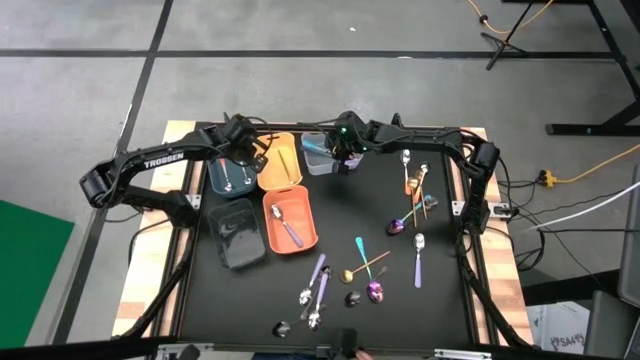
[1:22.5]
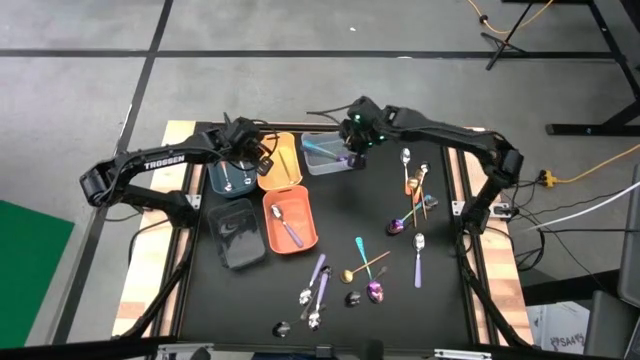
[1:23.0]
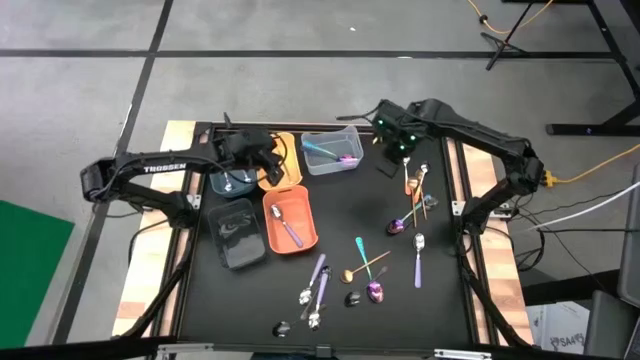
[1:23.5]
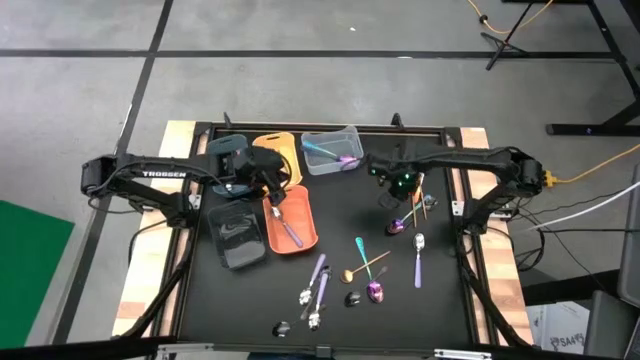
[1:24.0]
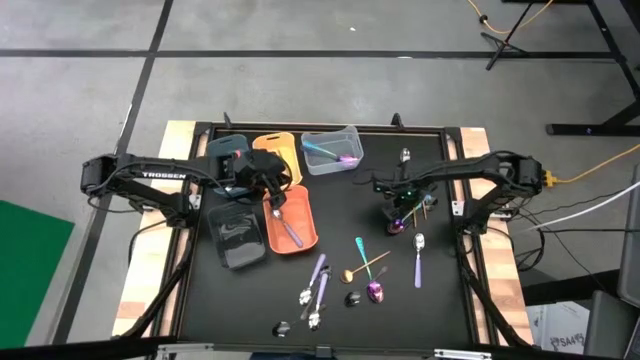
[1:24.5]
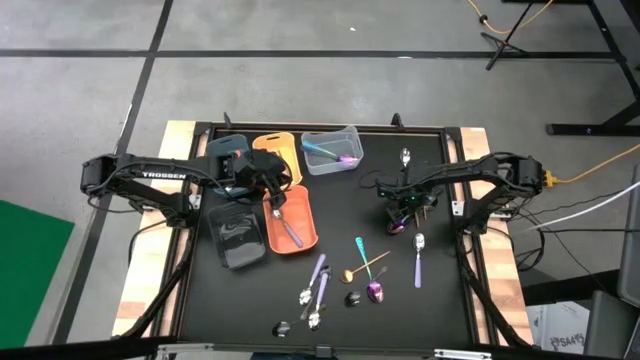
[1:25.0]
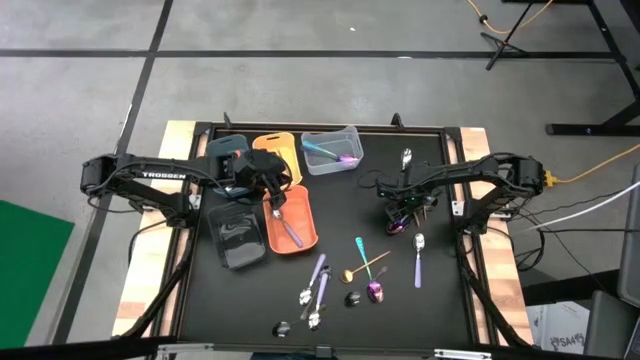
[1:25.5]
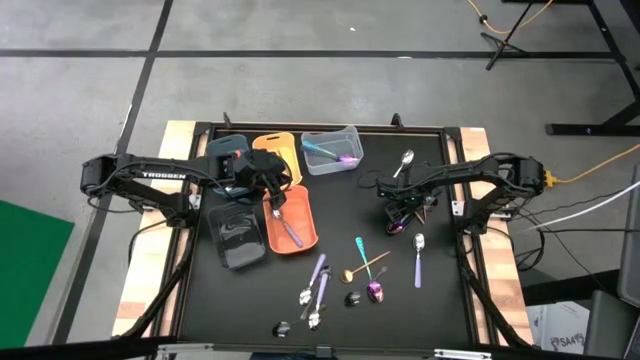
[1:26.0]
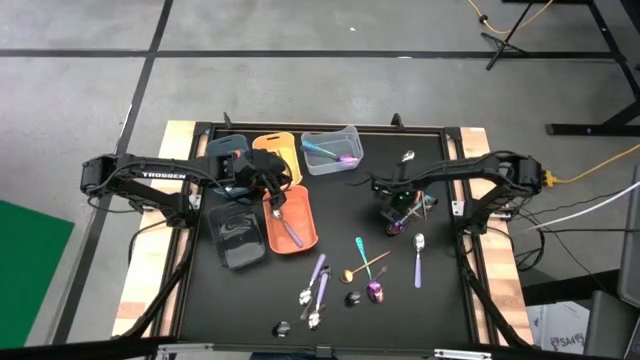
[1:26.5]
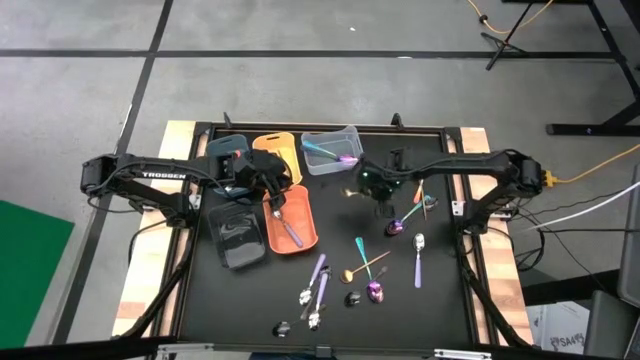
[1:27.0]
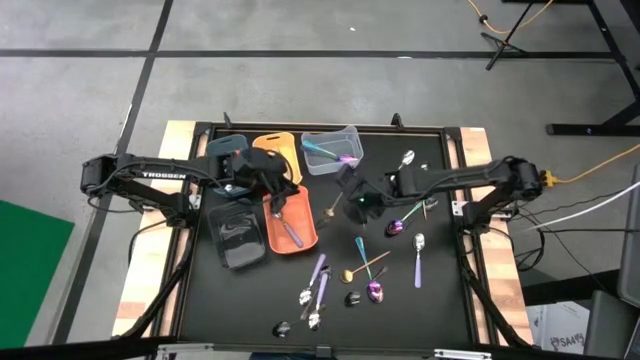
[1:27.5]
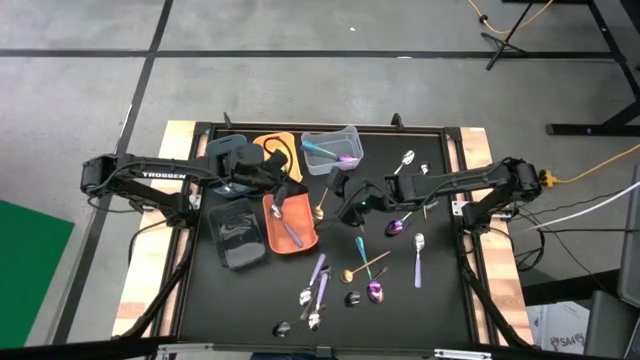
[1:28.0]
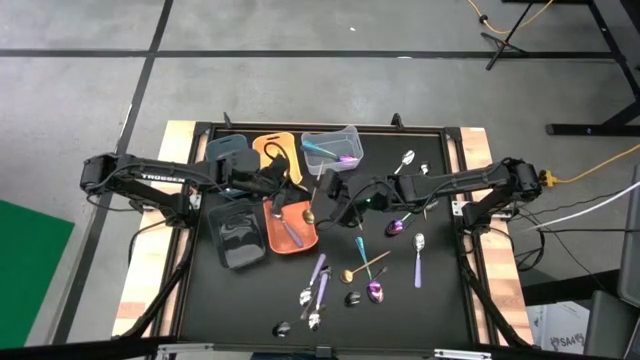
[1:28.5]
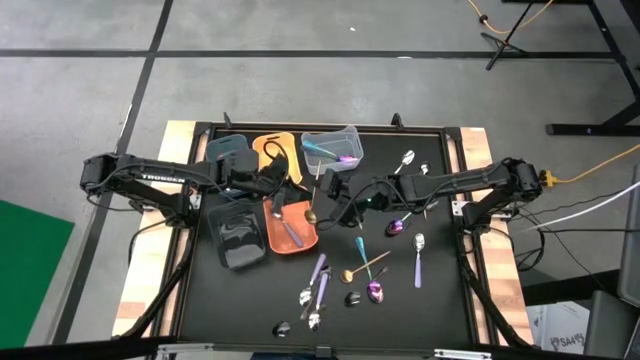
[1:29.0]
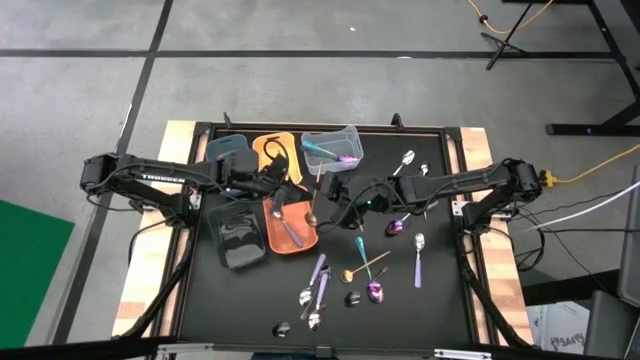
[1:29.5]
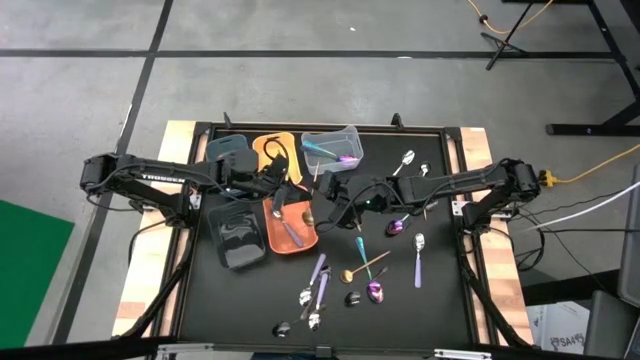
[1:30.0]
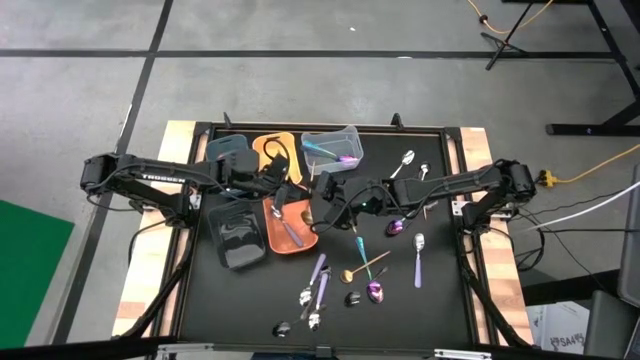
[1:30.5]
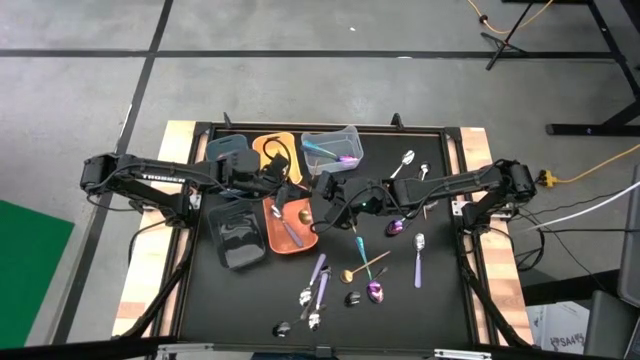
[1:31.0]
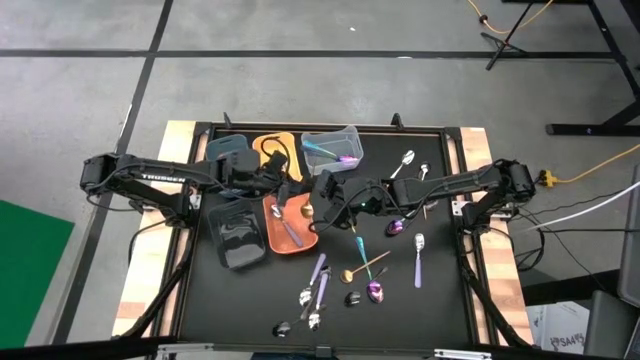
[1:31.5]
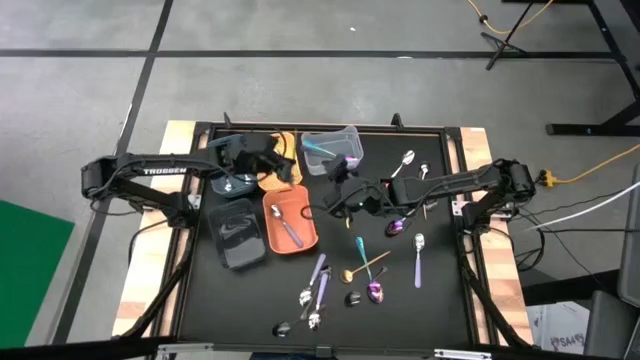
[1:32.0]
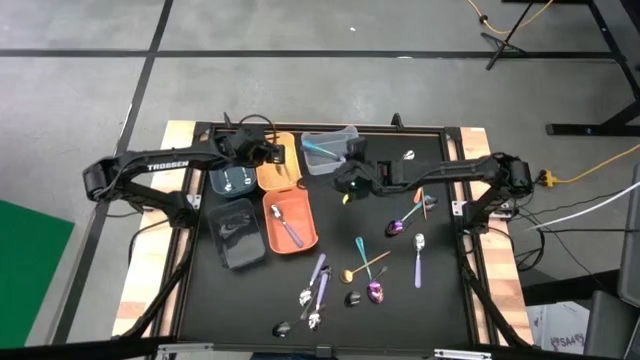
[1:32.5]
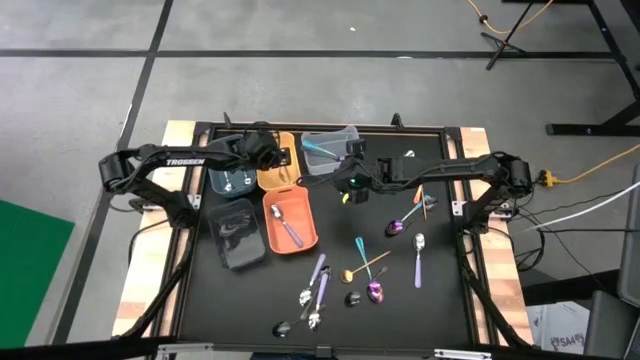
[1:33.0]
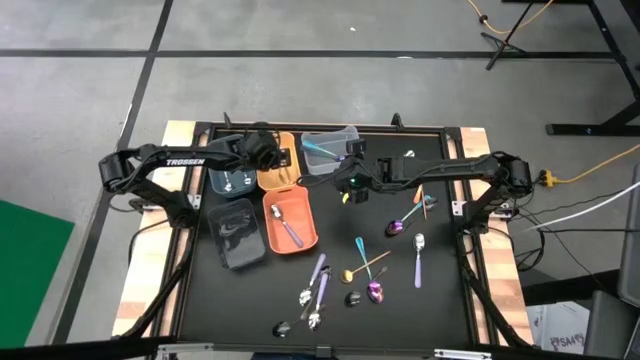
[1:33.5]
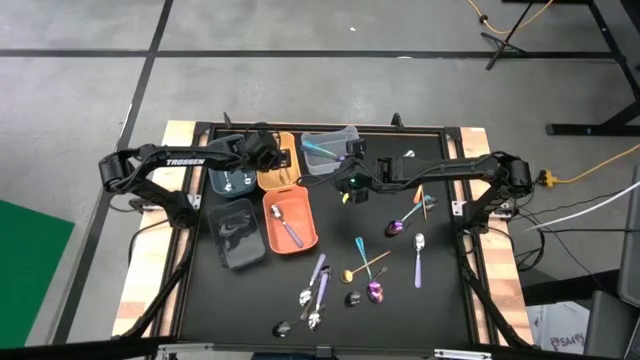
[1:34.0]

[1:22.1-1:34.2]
Task: Sort silverware by color (type)
Put the gold spoon into the yellow bin
